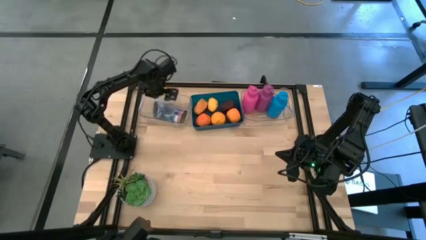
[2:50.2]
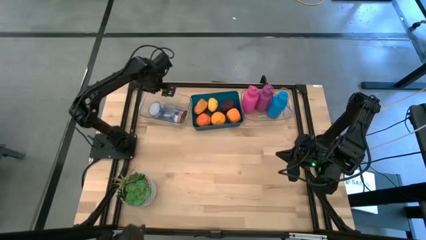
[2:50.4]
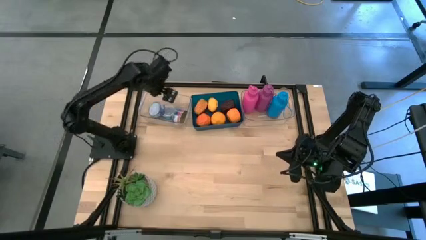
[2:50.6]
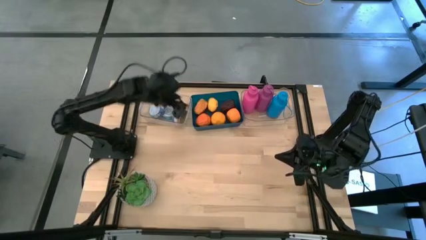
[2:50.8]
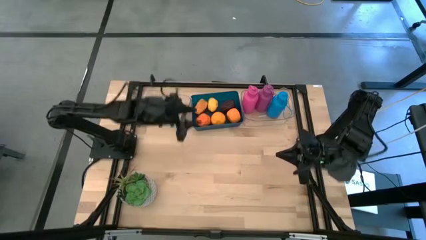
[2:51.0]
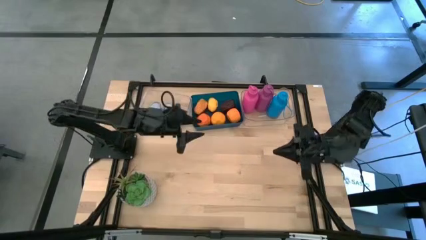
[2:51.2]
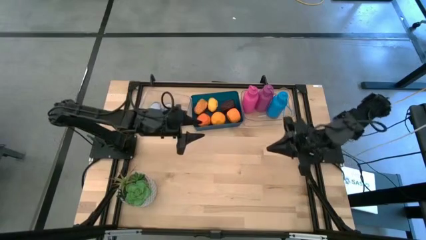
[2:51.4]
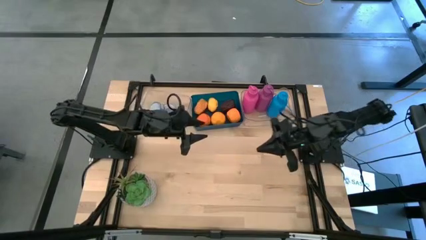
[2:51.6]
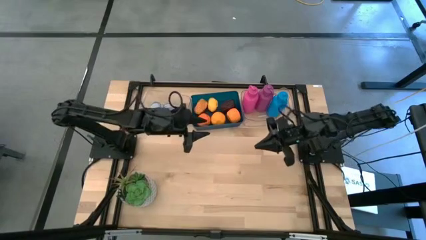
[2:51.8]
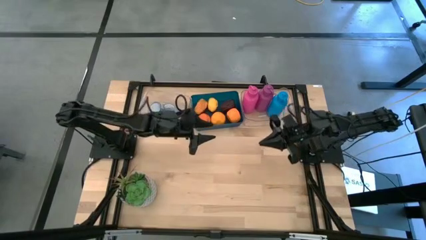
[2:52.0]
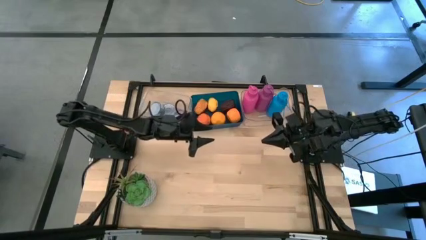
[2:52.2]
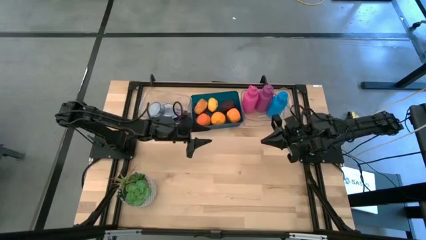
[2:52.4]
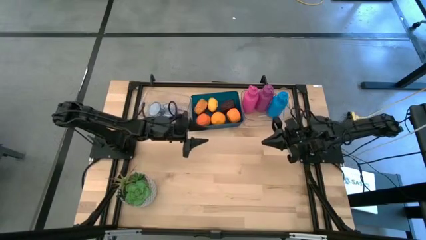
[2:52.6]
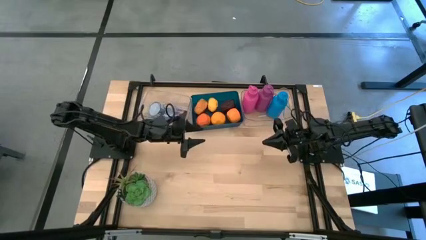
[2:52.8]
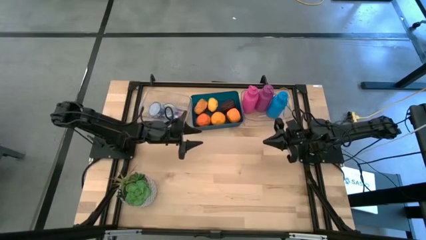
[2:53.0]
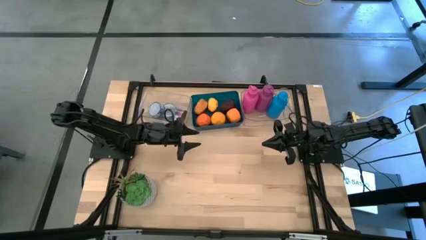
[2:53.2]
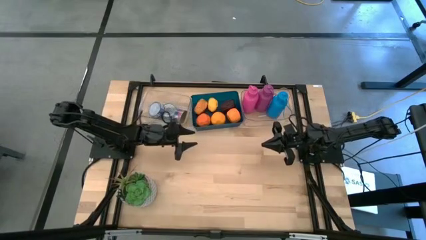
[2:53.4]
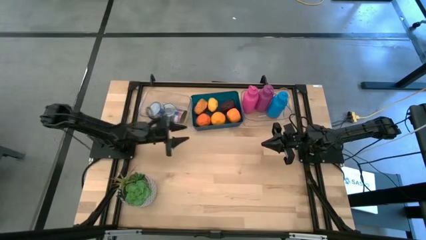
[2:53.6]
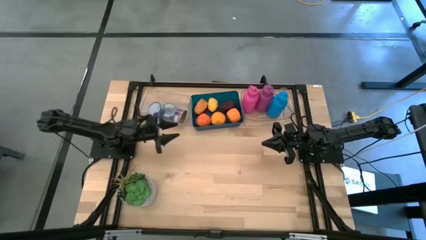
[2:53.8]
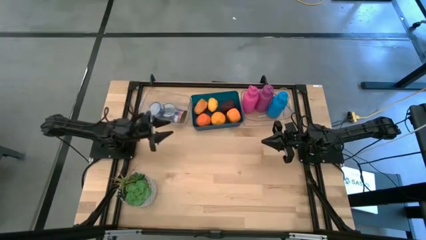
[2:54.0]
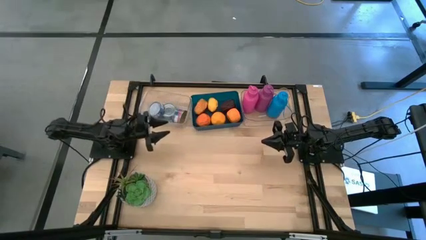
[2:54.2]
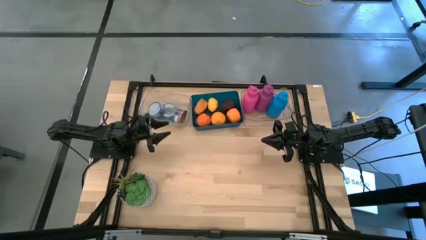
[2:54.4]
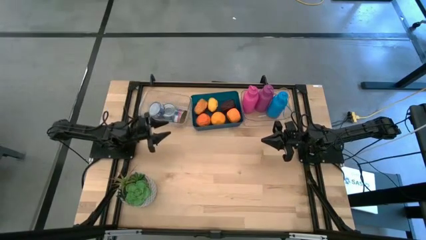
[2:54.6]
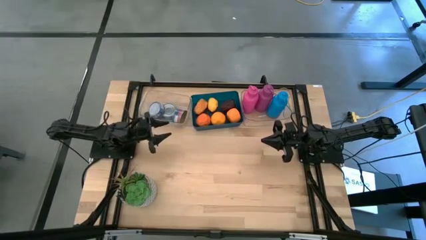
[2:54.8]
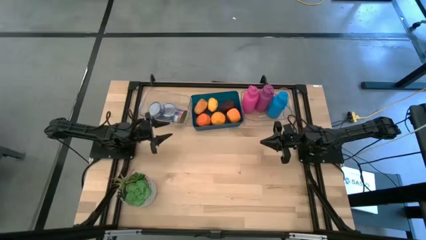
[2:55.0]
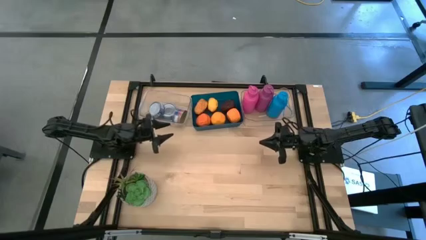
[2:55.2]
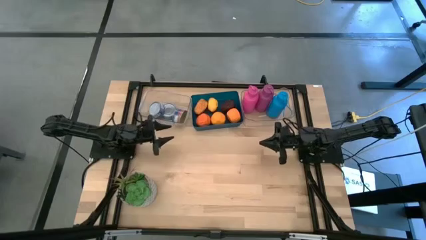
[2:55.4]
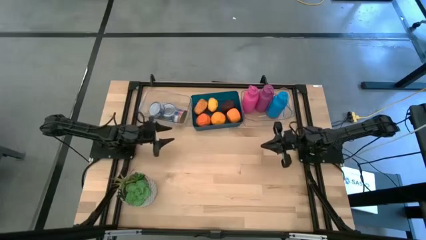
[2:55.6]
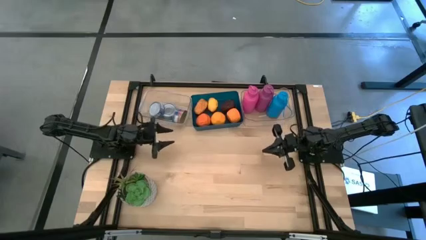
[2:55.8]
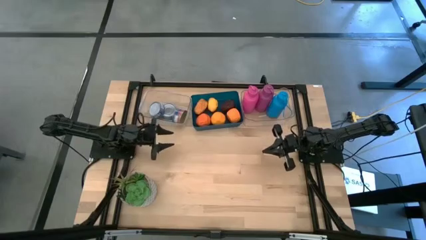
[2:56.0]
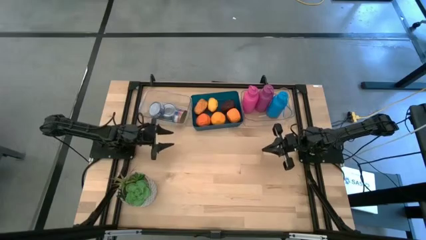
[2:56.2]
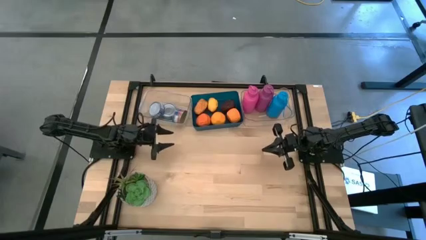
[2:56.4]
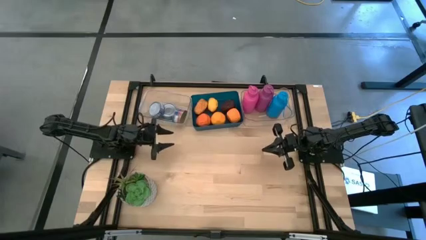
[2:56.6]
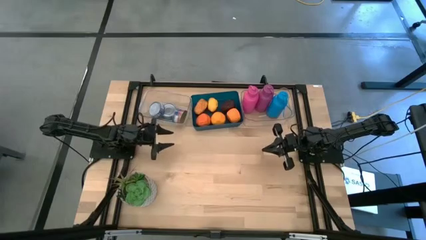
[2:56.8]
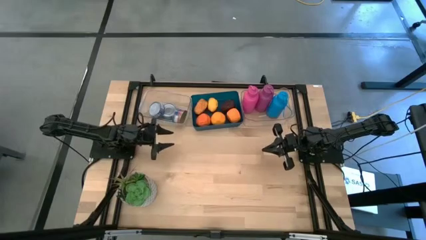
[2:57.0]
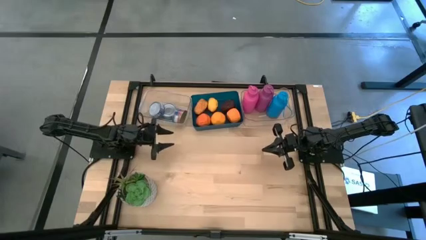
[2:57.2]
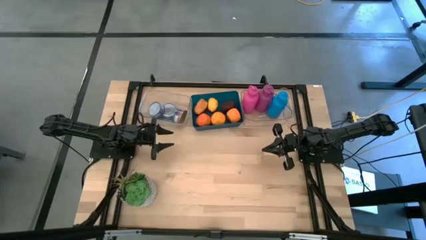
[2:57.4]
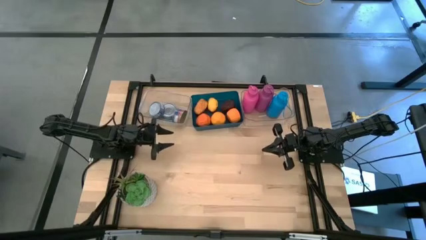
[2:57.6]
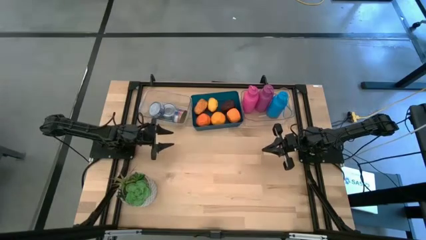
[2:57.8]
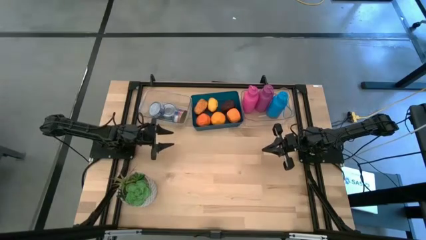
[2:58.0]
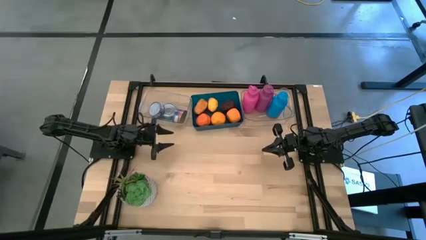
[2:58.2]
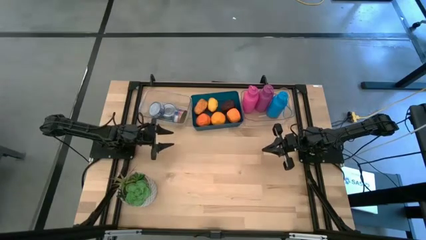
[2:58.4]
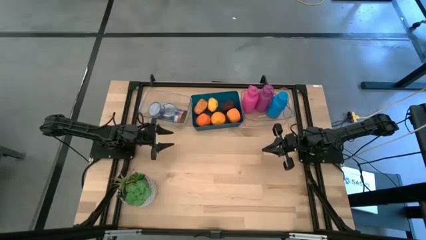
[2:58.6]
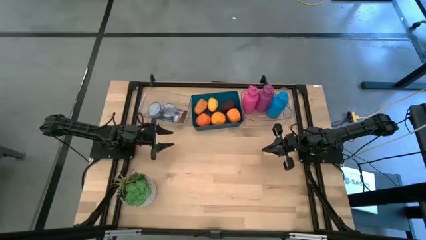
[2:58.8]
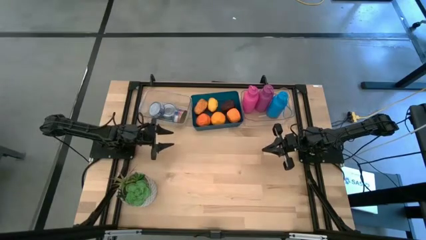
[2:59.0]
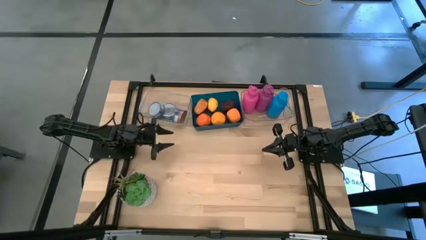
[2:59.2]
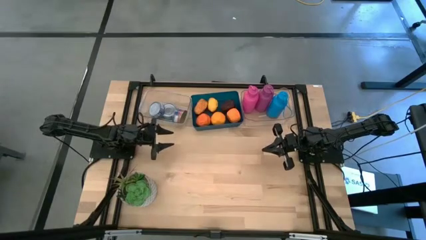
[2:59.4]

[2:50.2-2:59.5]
Task: Pick & Place Food Item
Return to Home Position
